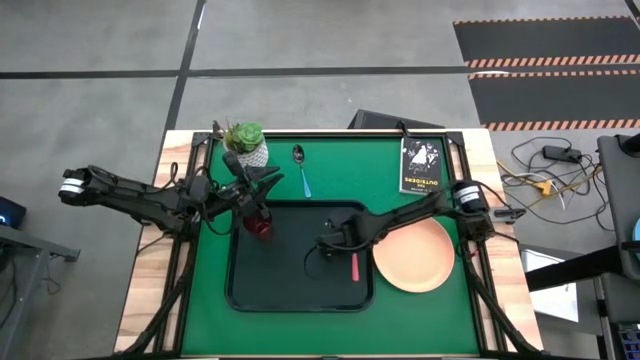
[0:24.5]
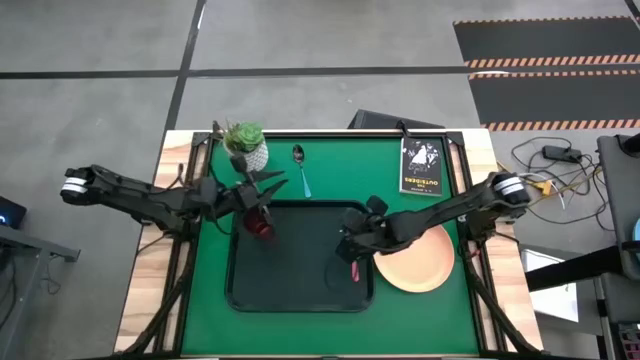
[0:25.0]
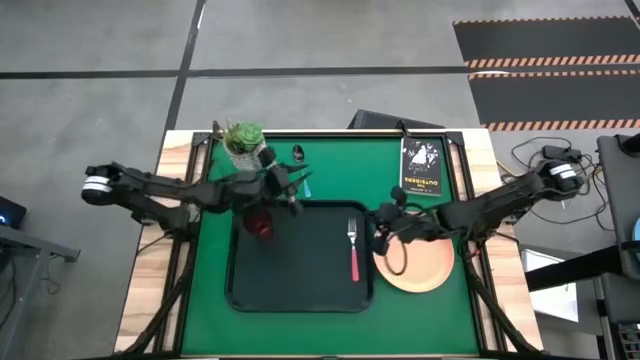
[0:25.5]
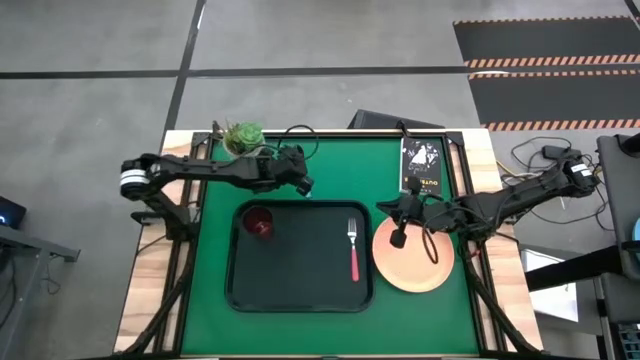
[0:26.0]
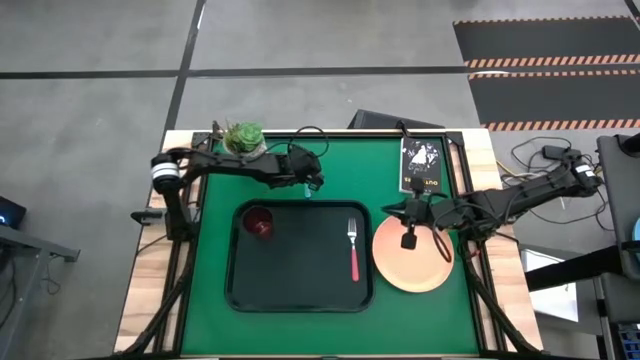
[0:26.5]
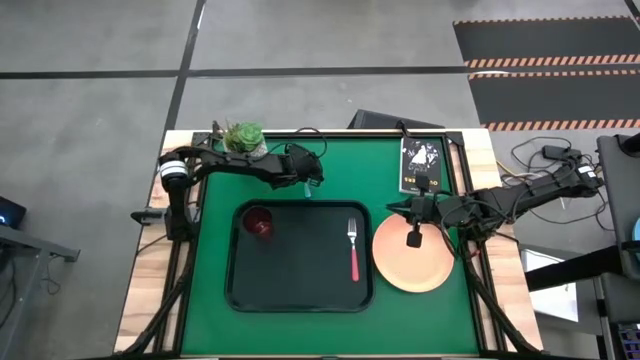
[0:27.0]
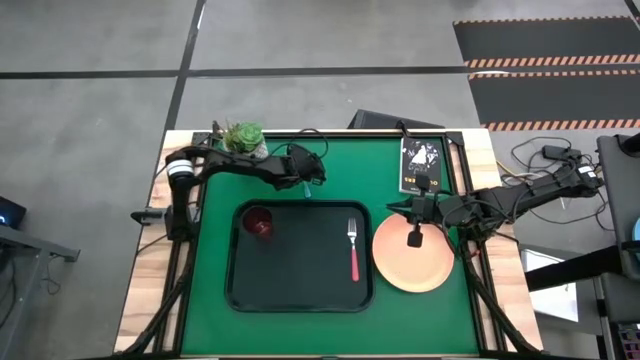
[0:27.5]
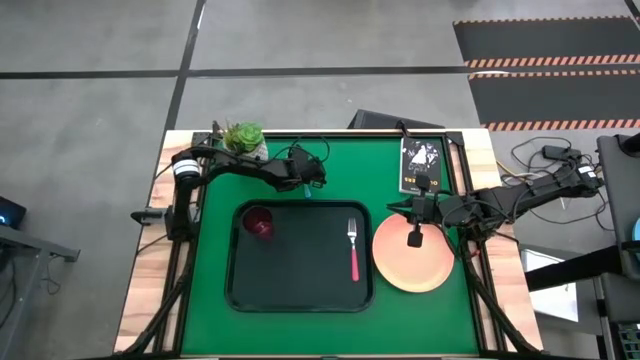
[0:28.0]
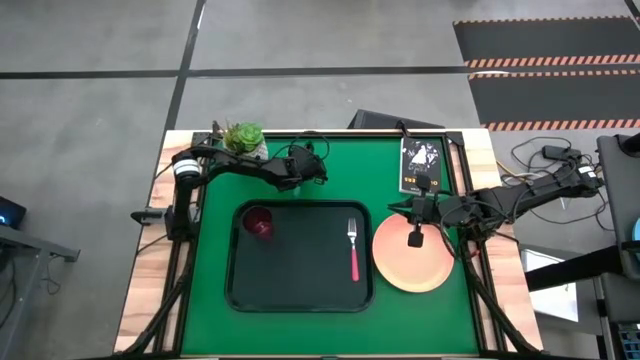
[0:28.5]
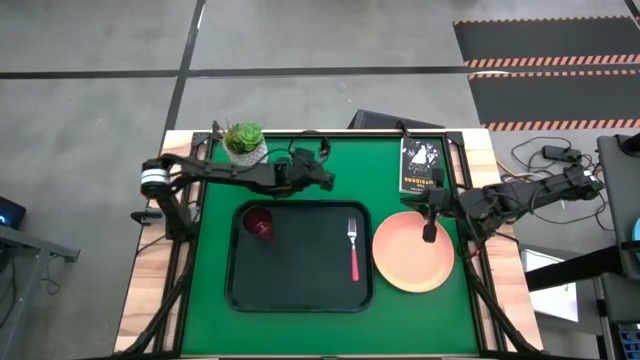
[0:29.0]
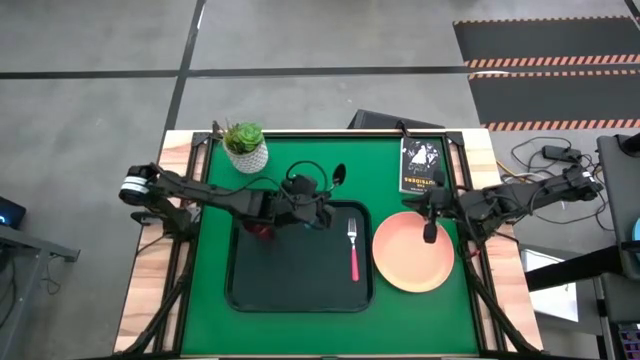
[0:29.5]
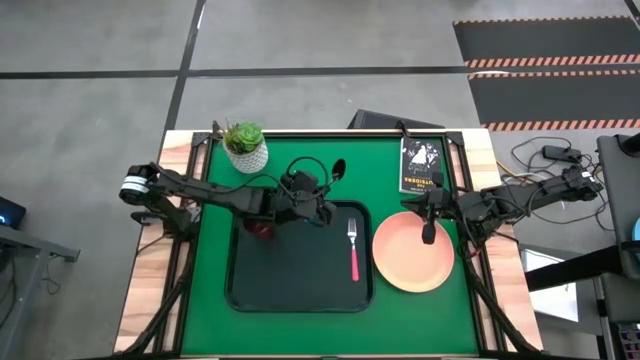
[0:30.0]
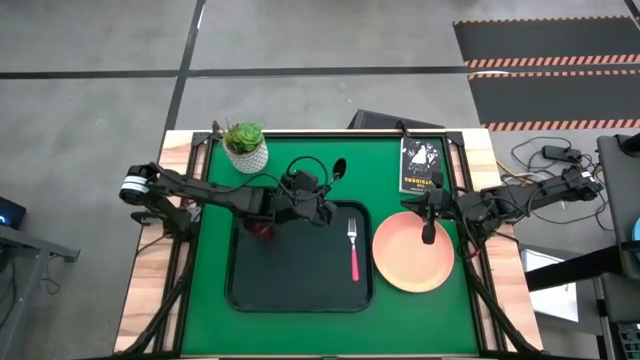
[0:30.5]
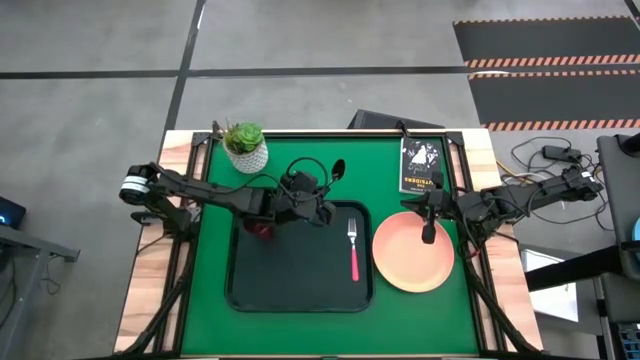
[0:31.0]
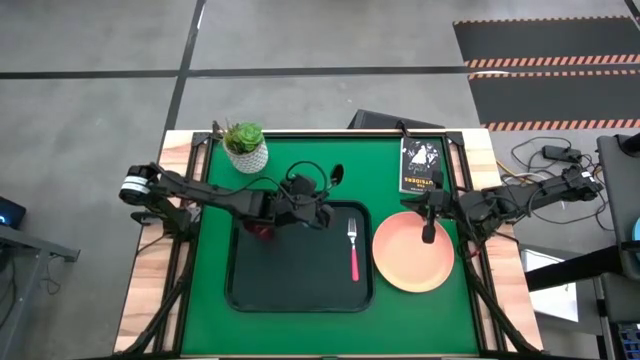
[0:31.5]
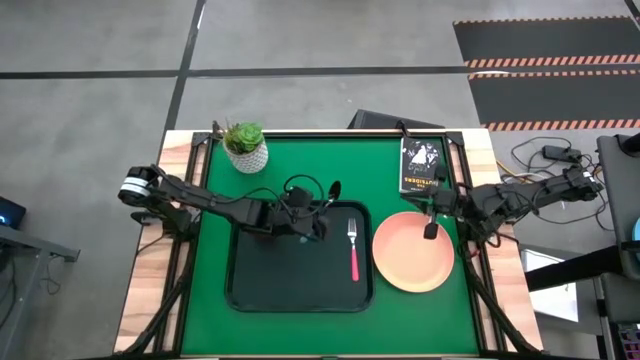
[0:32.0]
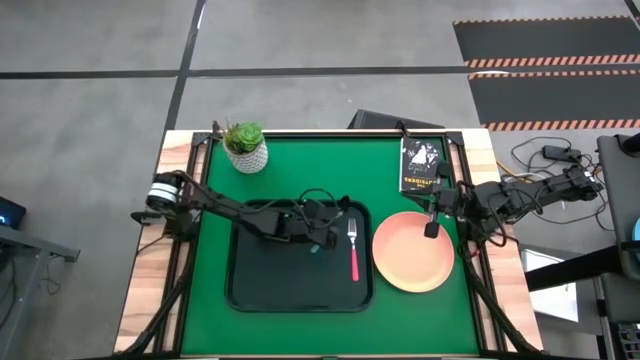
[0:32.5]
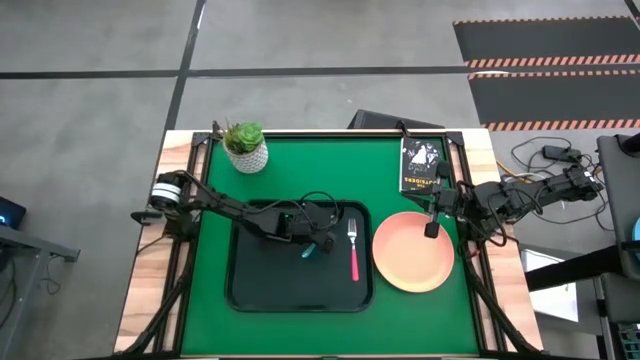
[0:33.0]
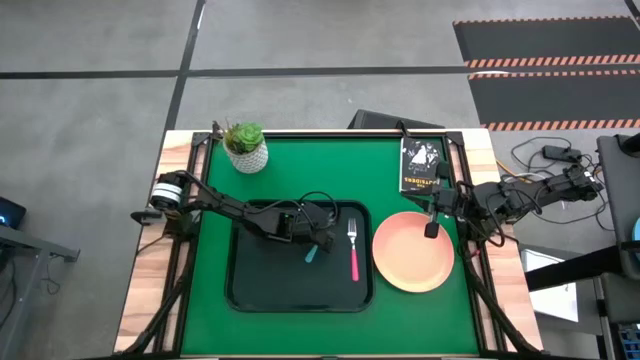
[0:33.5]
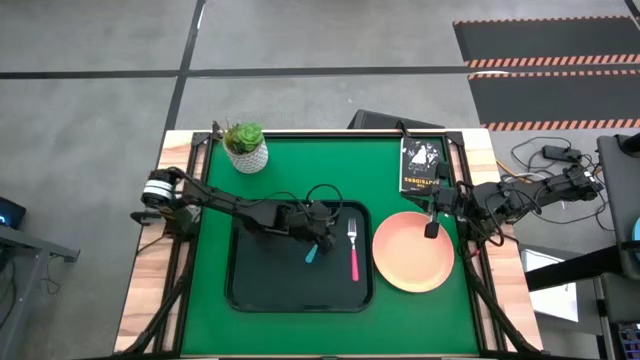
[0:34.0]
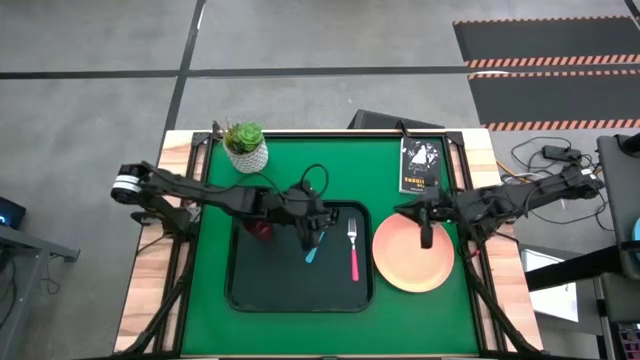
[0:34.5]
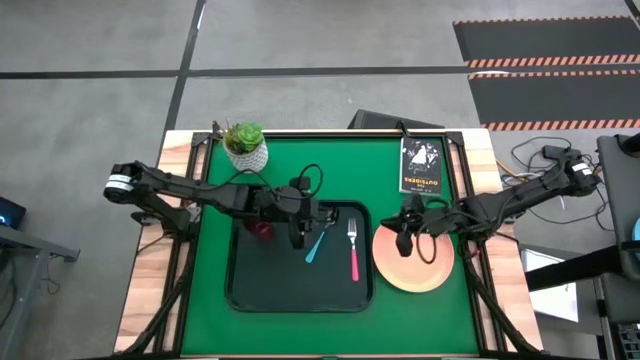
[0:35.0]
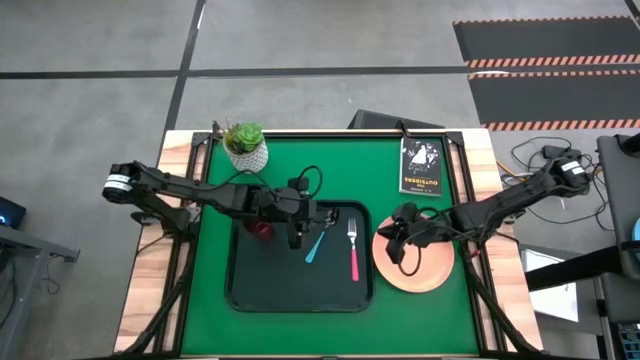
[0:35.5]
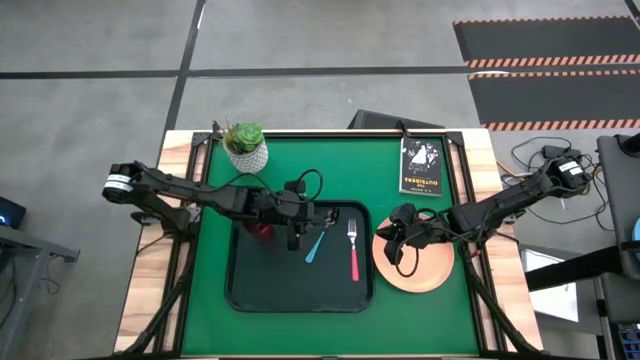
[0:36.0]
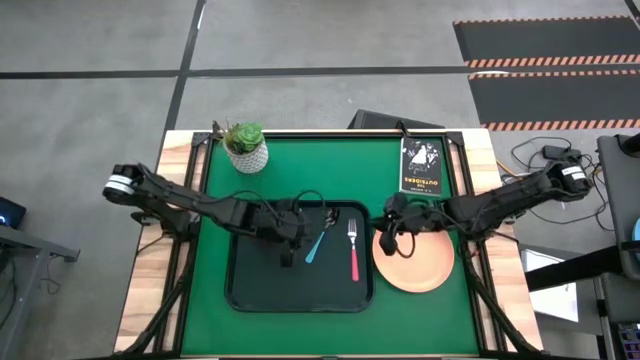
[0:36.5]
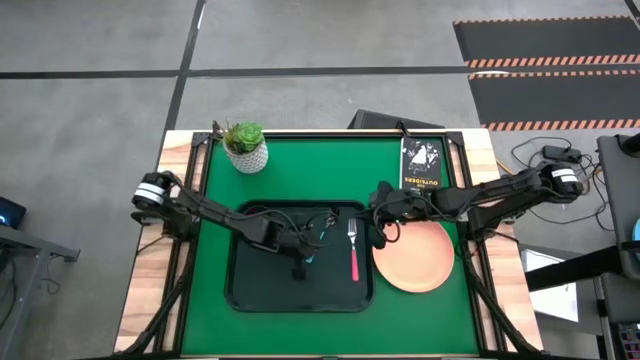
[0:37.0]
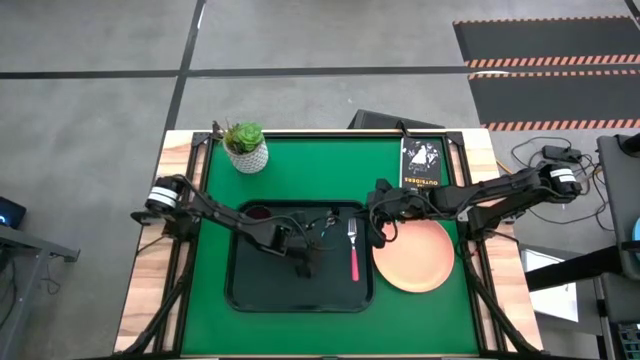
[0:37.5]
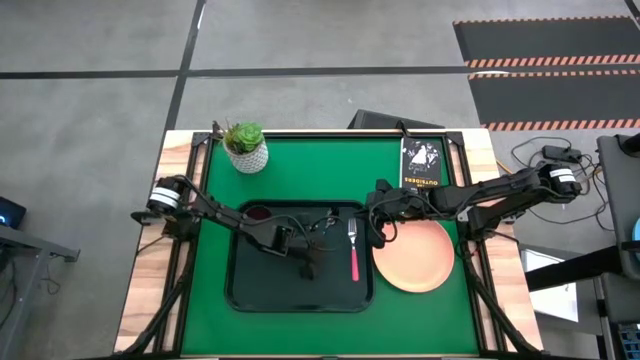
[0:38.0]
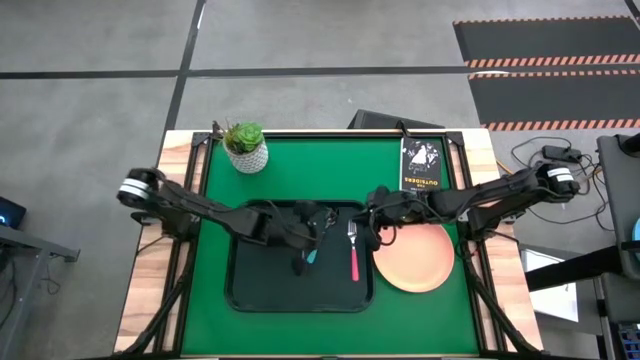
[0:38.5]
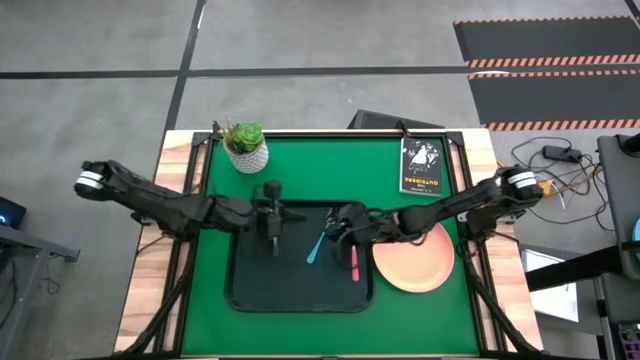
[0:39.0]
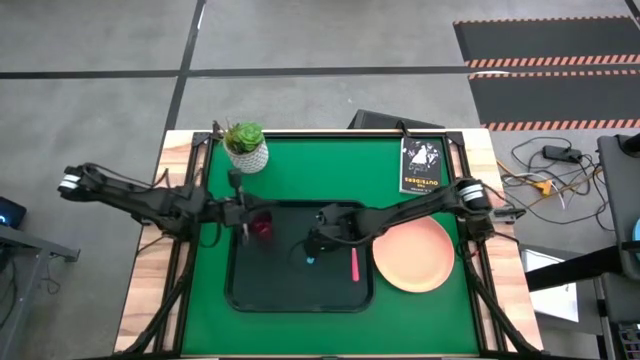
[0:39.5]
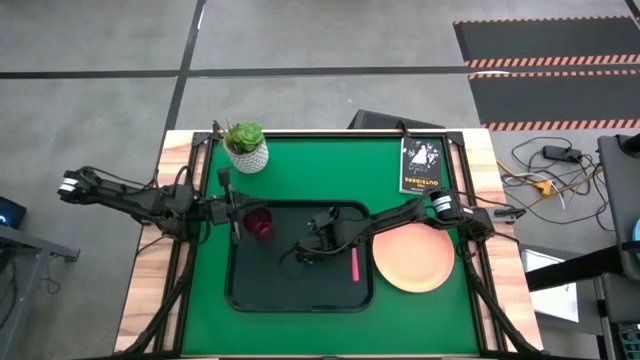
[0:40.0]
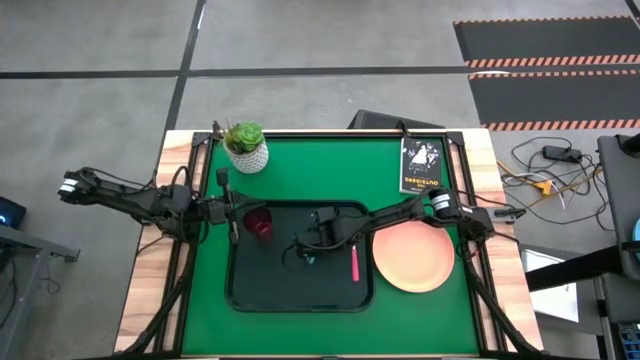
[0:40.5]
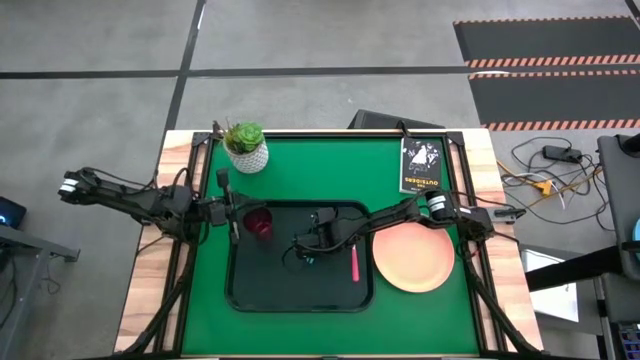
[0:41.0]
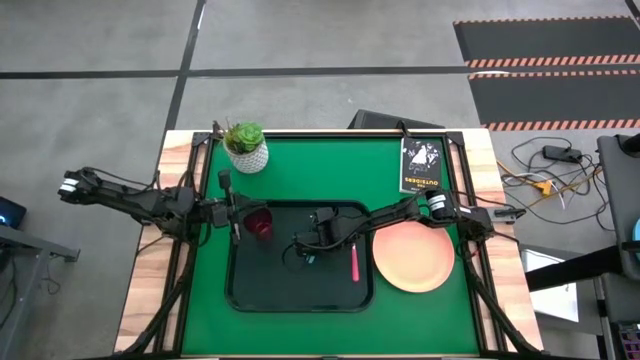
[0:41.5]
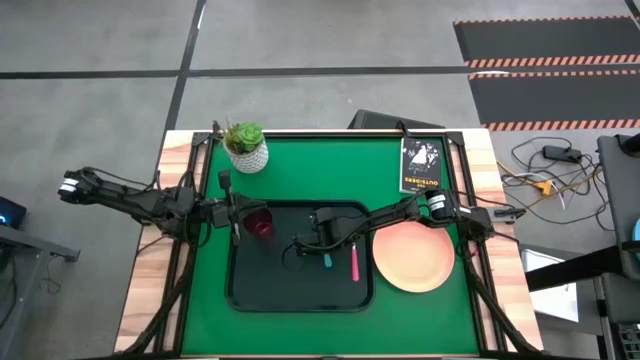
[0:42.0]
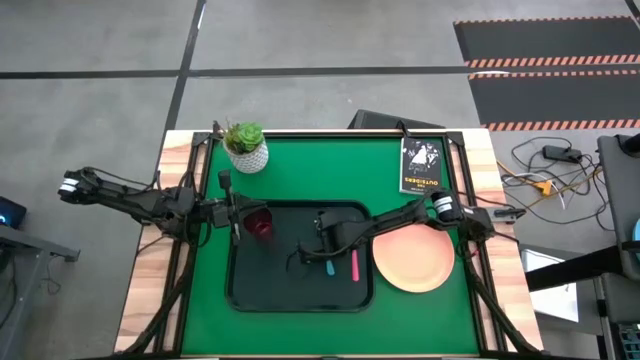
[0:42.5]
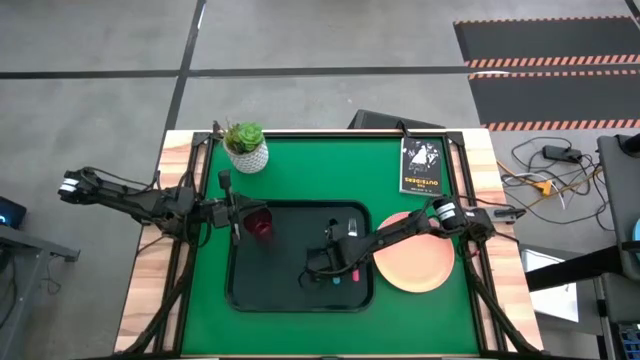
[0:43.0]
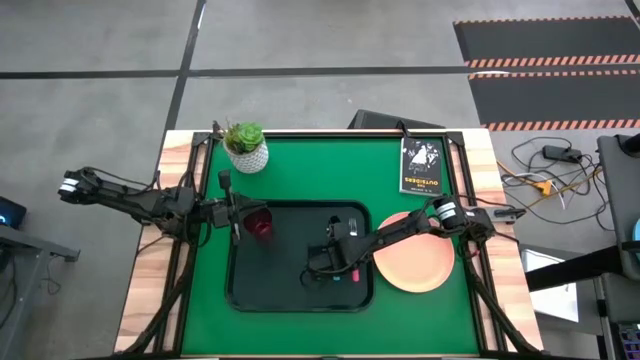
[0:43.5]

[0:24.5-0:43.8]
Task: Pick and place plate/cup/fork/spoon on tray
Put the light blue spoon on the black tray to the left of the pink fork
